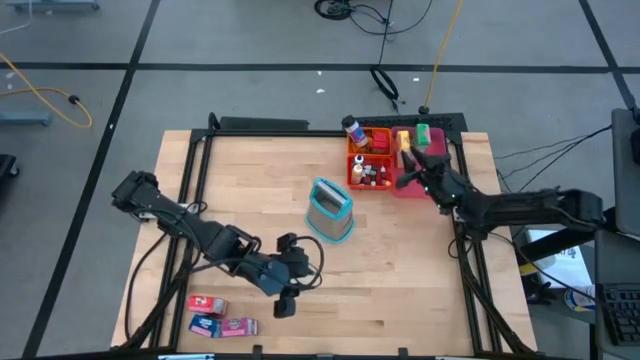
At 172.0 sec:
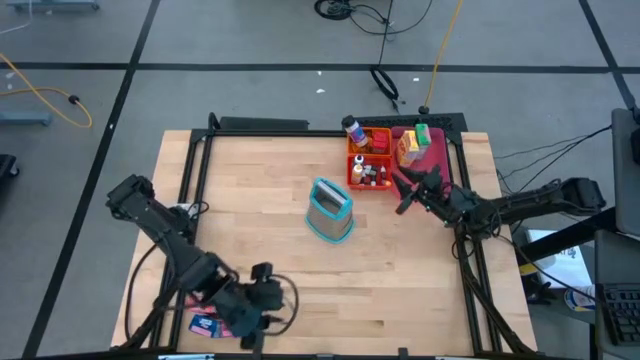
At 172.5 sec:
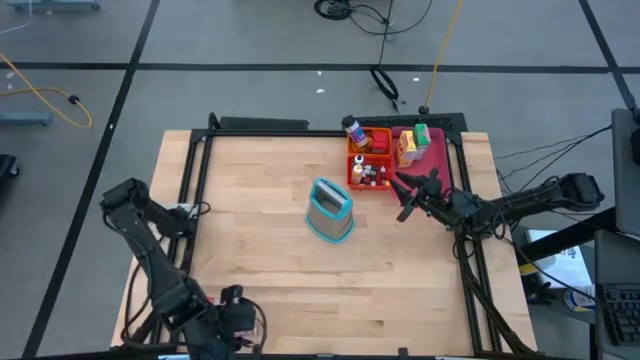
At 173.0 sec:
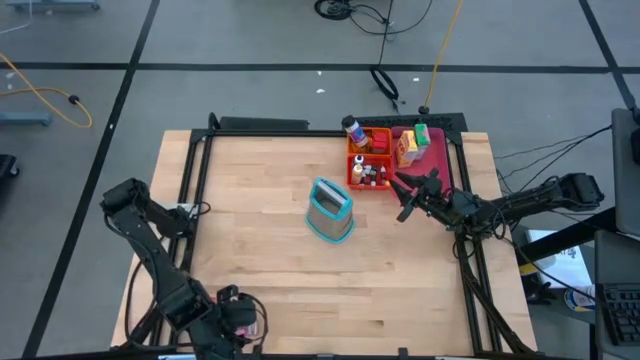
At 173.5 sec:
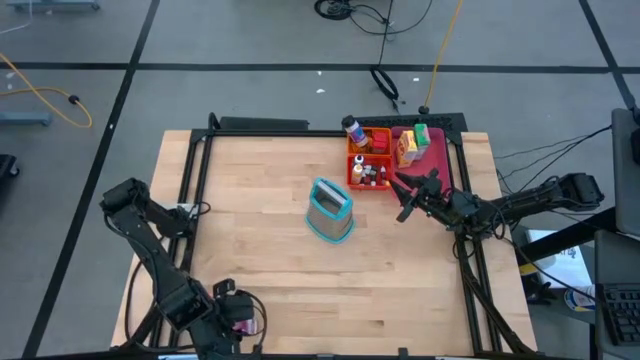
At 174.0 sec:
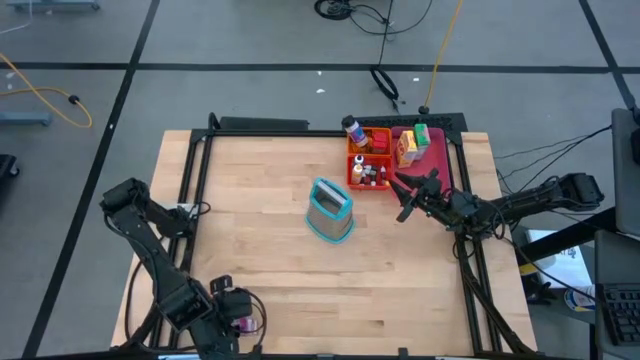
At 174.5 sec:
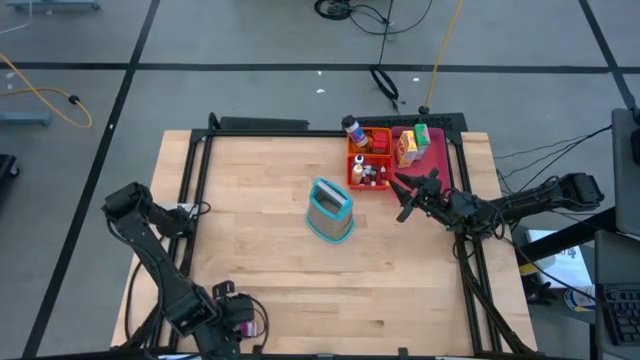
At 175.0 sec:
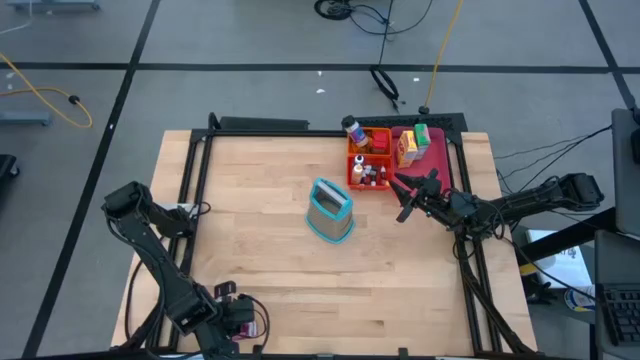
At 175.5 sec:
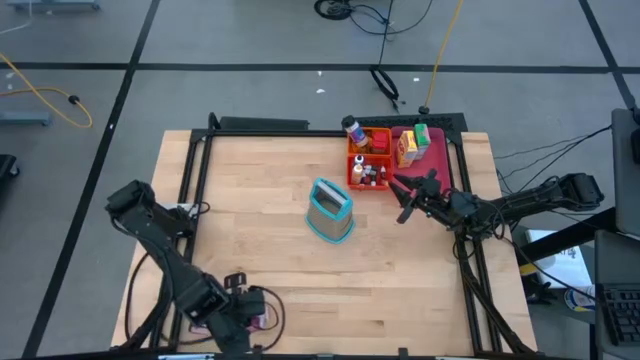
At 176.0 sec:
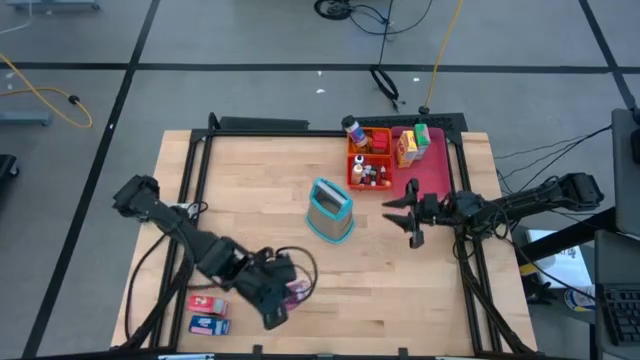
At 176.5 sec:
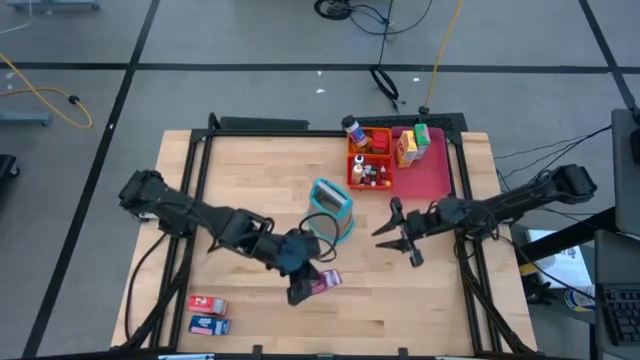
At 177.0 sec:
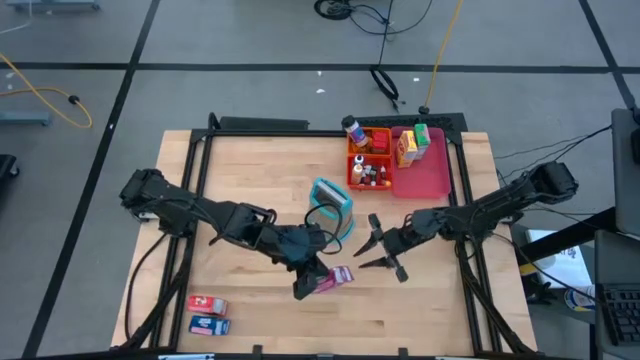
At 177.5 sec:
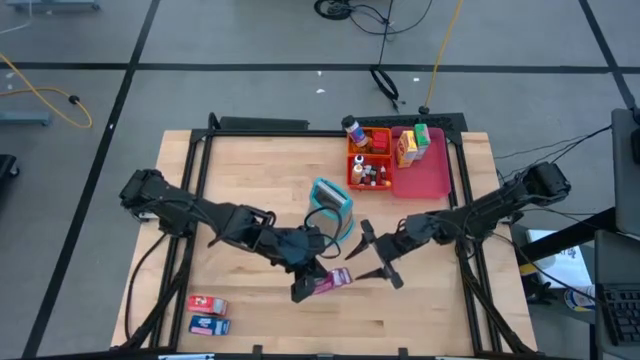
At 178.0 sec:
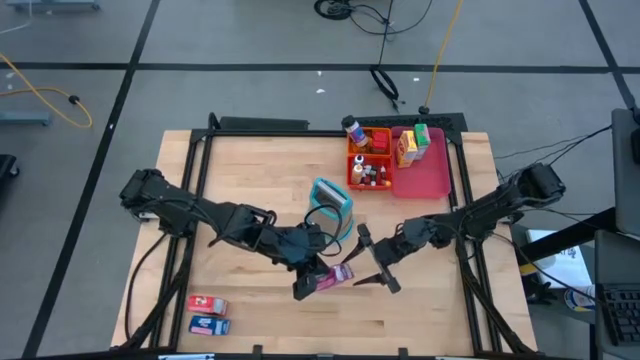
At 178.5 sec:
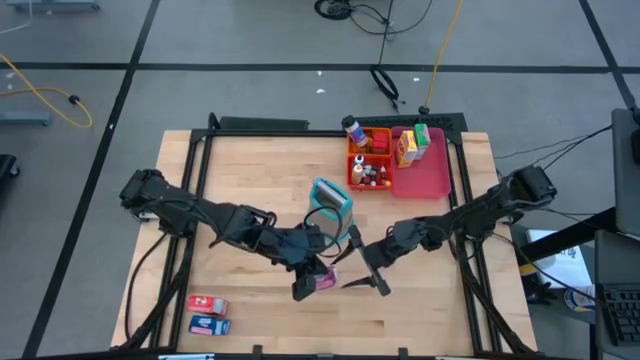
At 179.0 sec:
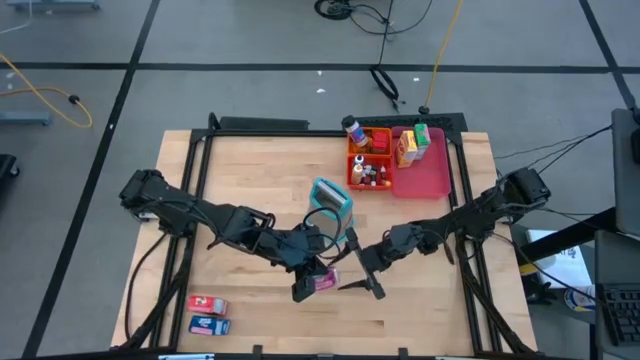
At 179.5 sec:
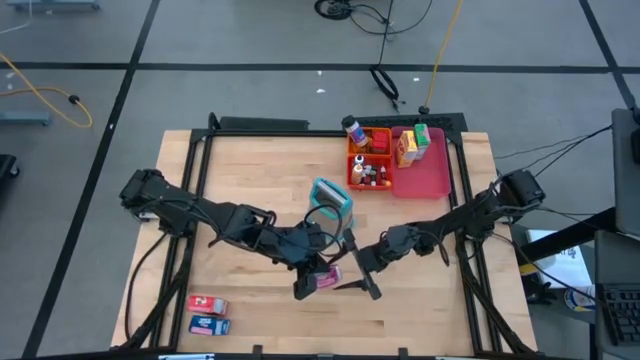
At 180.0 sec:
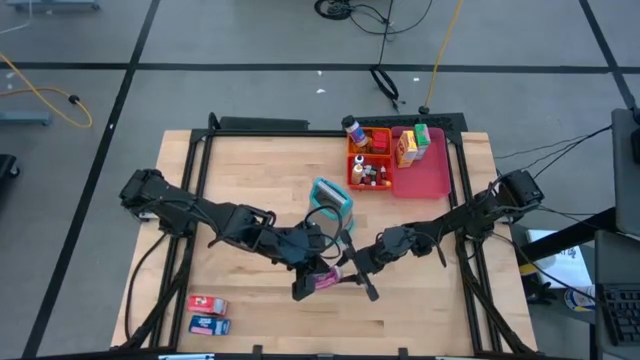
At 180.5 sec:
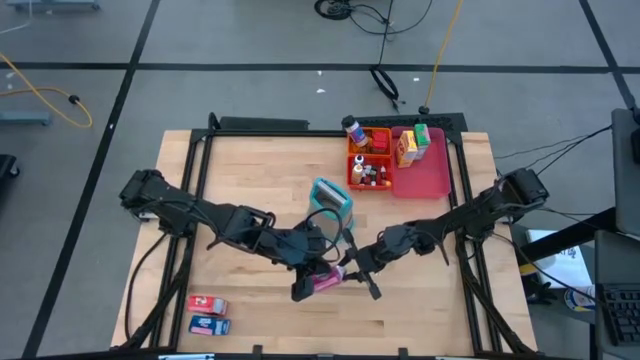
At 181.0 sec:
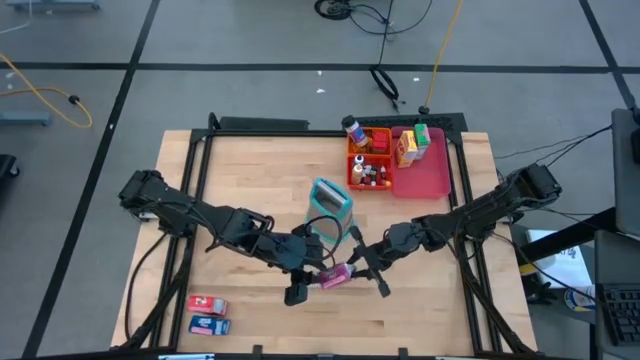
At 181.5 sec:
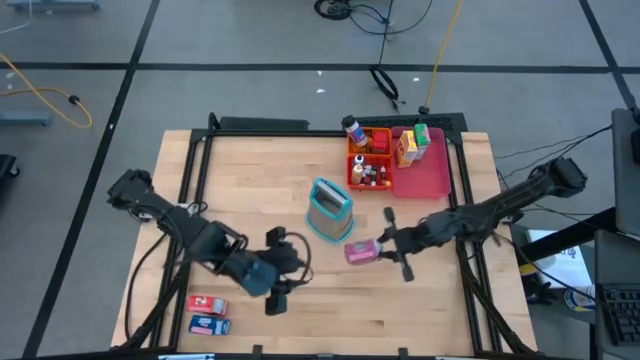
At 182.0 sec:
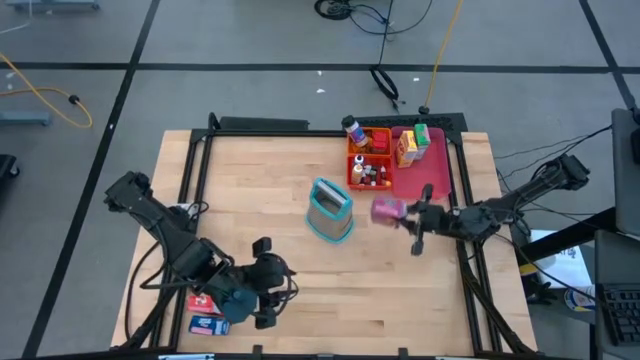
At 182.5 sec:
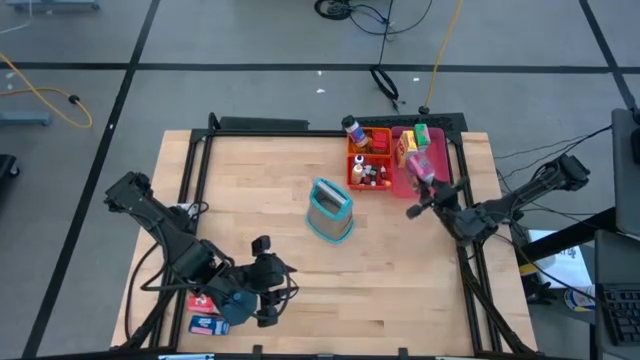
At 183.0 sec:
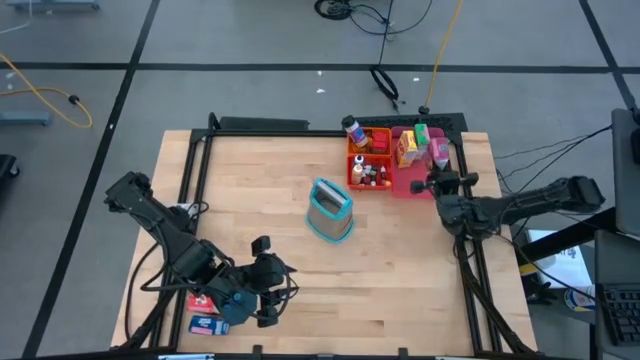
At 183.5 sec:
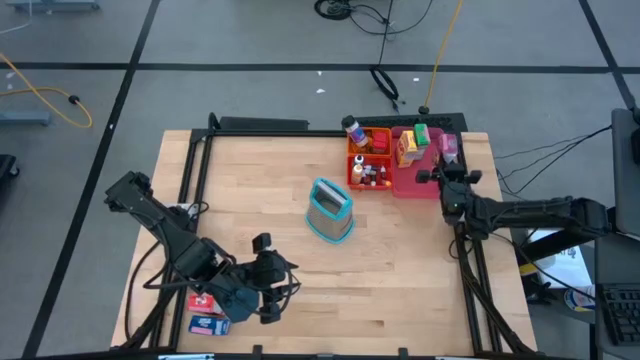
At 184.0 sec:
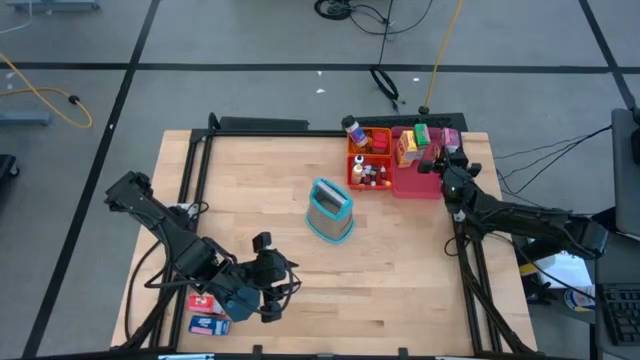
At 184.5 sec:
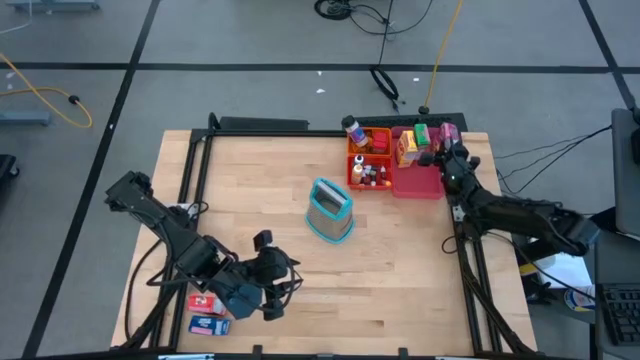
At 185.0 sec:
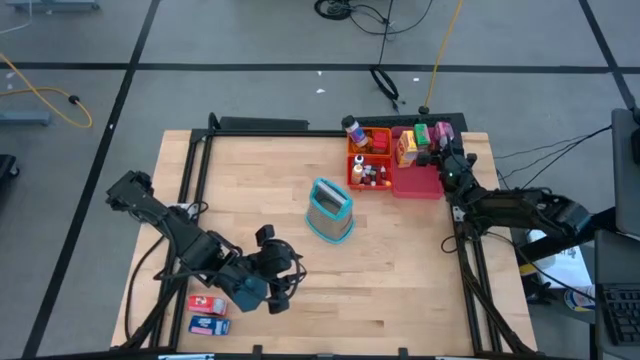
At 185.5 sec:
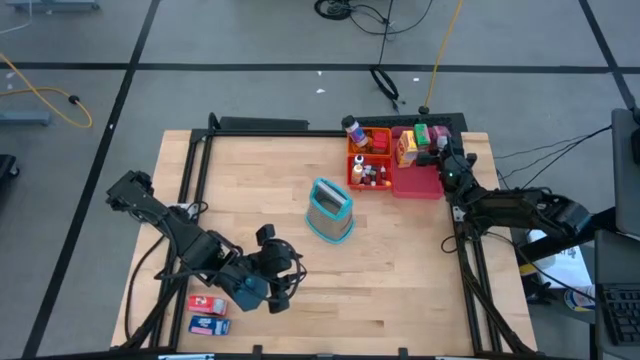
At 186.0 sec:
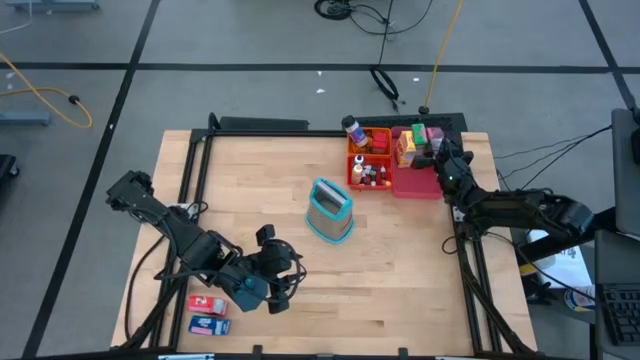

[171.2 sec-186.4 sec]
Task: Pick & Place Kitchen Items
Put the purple cereal box into the red bin
